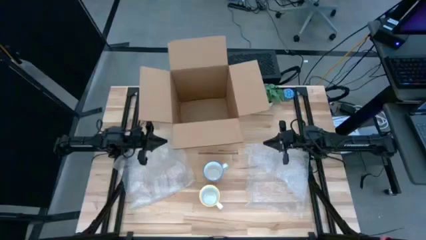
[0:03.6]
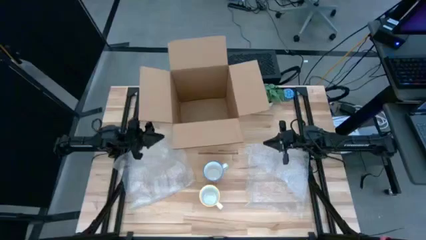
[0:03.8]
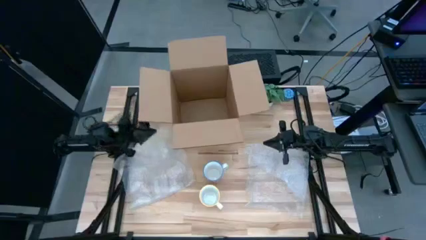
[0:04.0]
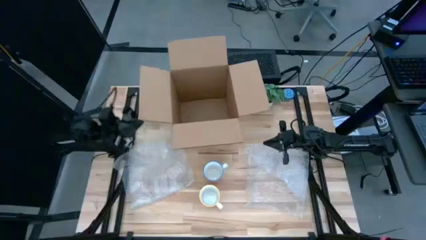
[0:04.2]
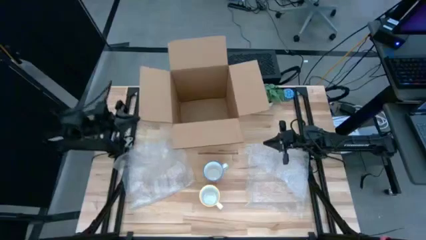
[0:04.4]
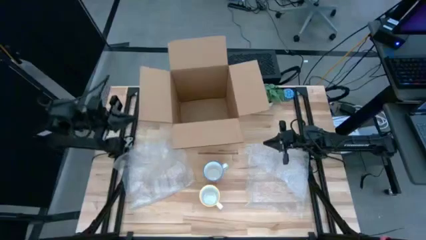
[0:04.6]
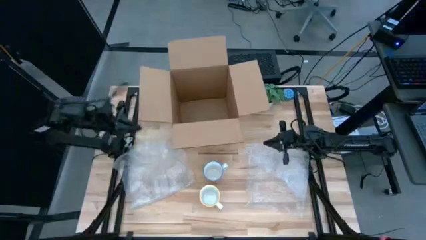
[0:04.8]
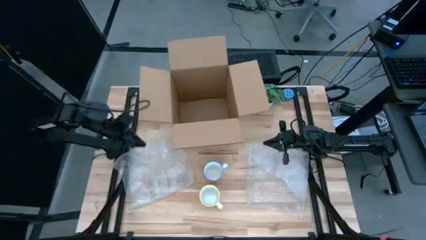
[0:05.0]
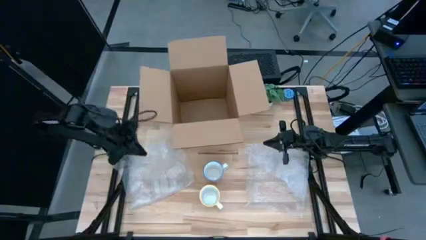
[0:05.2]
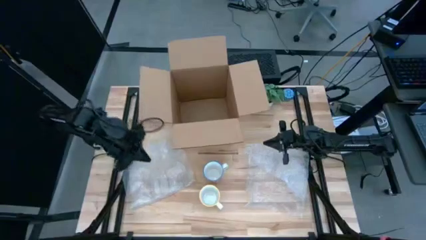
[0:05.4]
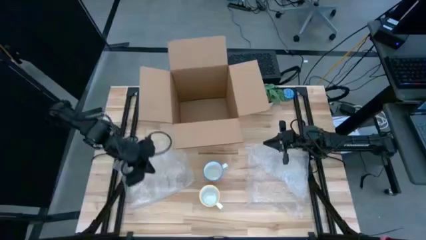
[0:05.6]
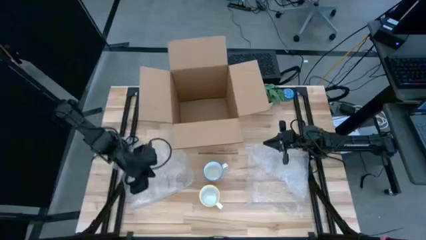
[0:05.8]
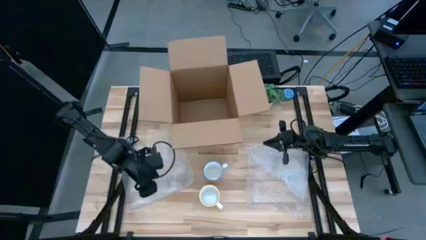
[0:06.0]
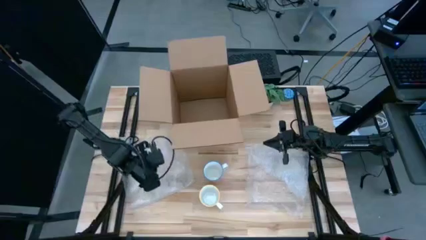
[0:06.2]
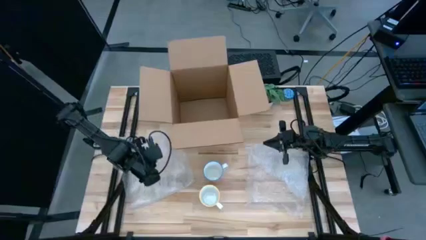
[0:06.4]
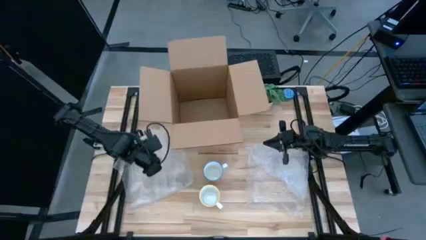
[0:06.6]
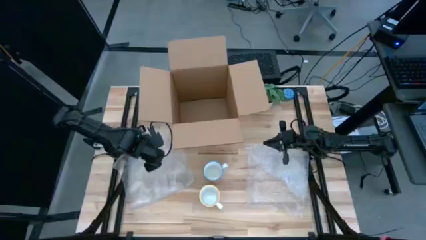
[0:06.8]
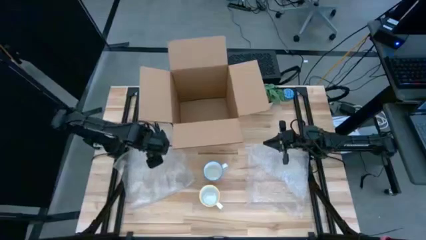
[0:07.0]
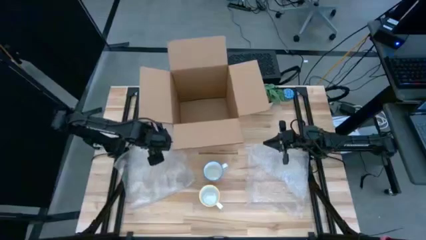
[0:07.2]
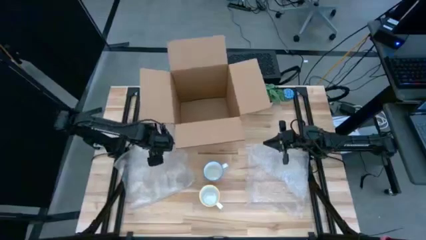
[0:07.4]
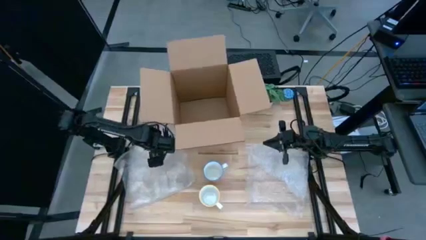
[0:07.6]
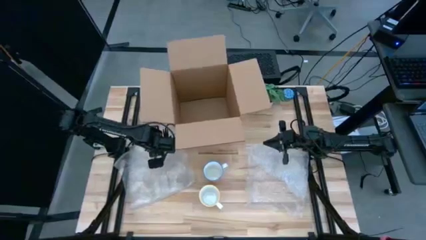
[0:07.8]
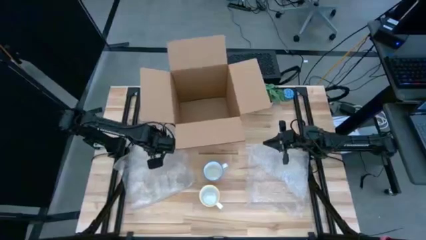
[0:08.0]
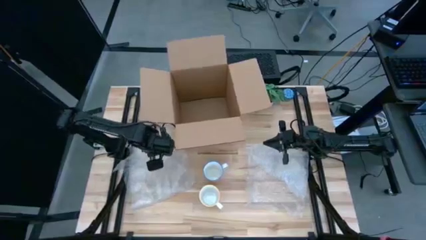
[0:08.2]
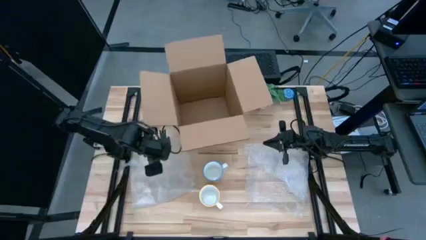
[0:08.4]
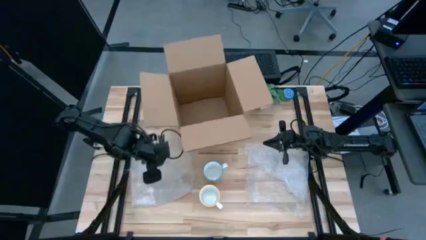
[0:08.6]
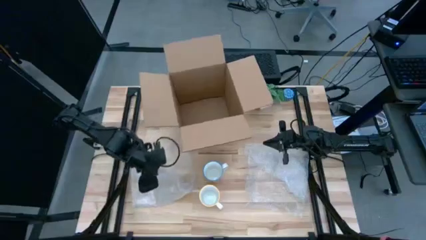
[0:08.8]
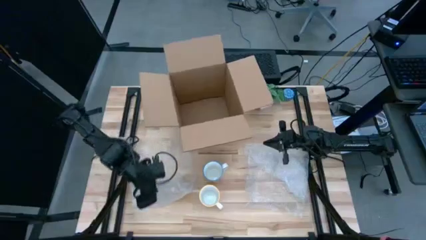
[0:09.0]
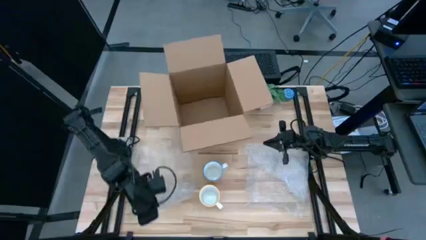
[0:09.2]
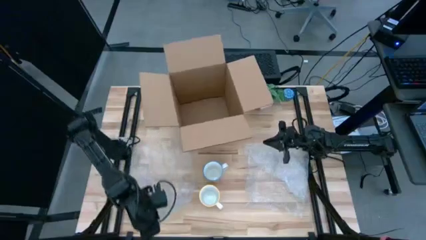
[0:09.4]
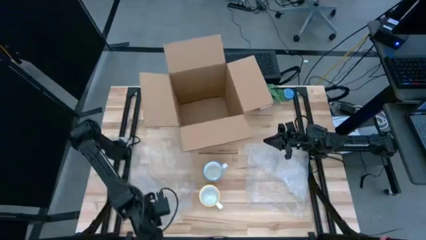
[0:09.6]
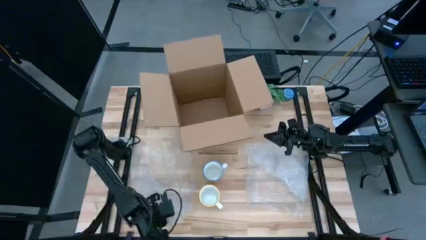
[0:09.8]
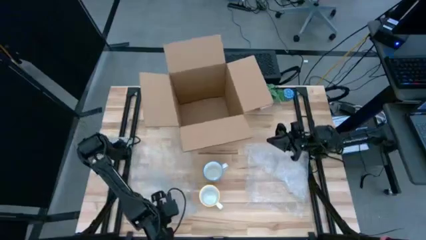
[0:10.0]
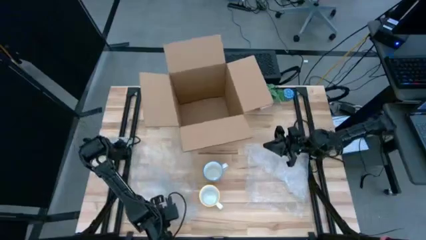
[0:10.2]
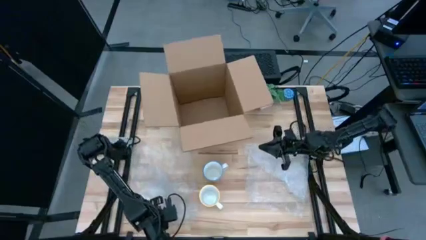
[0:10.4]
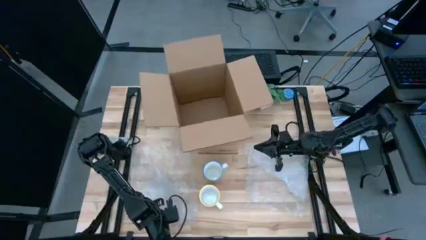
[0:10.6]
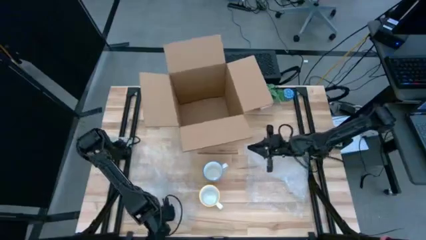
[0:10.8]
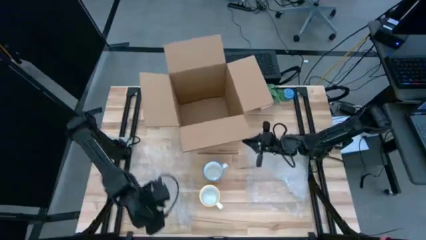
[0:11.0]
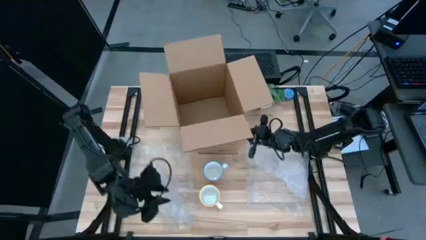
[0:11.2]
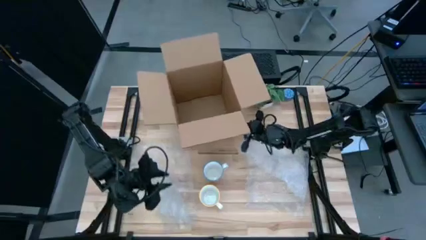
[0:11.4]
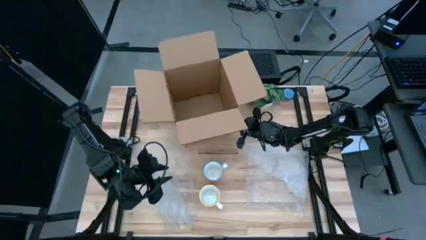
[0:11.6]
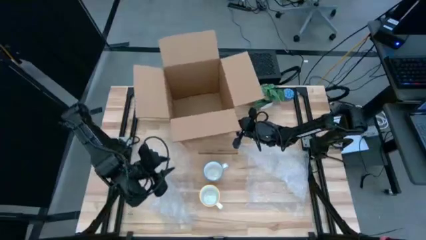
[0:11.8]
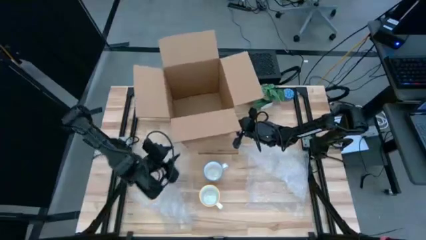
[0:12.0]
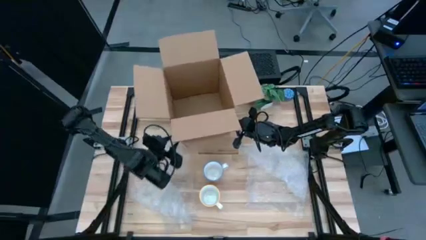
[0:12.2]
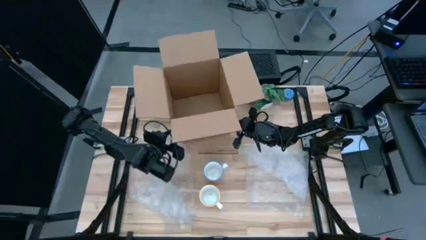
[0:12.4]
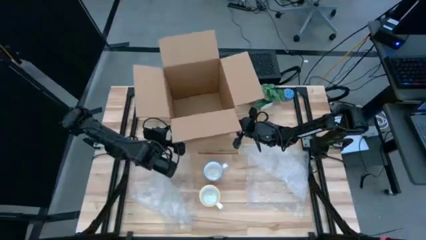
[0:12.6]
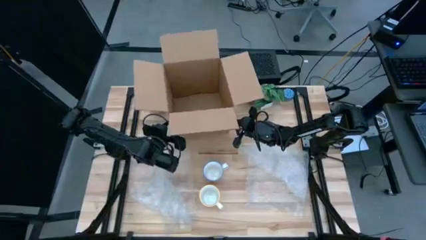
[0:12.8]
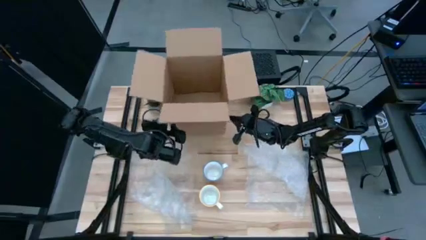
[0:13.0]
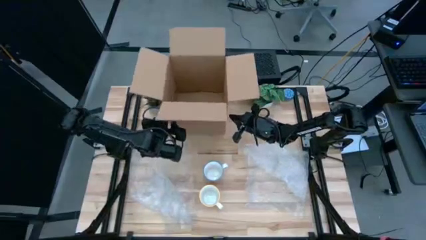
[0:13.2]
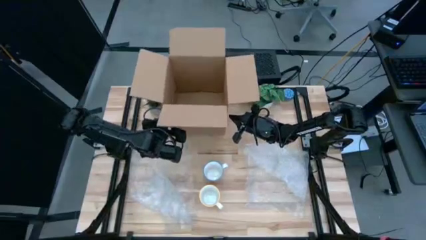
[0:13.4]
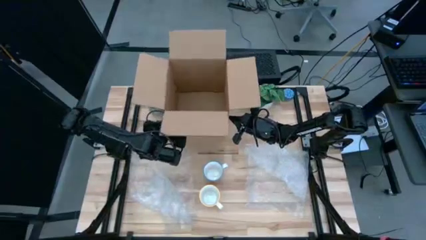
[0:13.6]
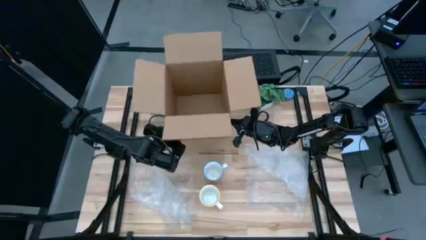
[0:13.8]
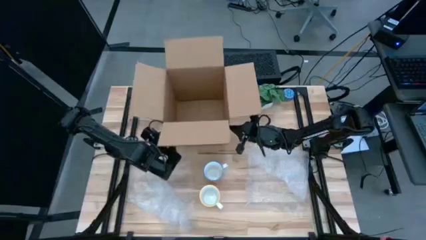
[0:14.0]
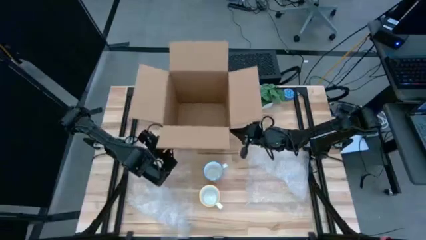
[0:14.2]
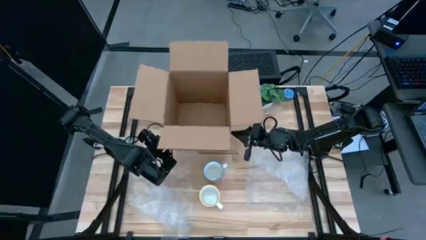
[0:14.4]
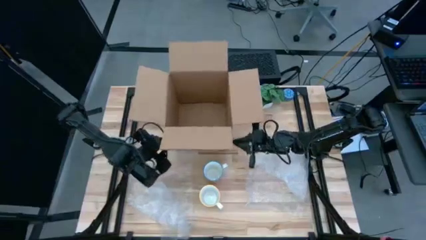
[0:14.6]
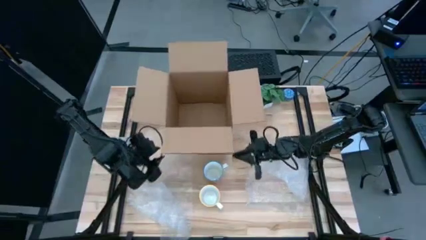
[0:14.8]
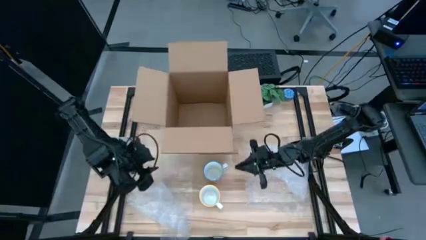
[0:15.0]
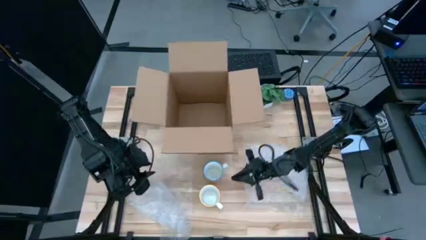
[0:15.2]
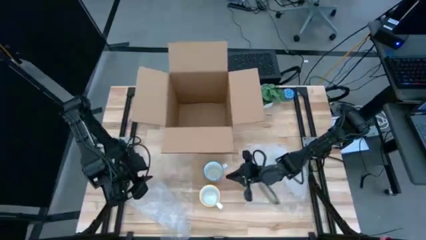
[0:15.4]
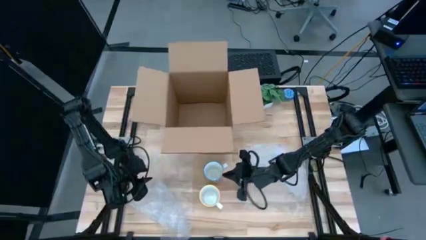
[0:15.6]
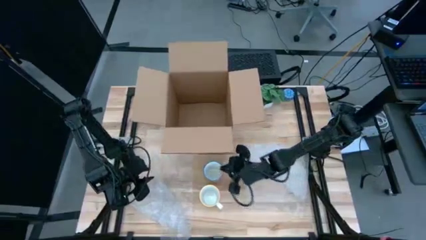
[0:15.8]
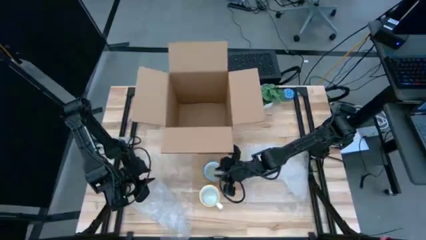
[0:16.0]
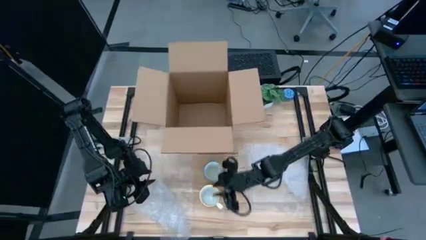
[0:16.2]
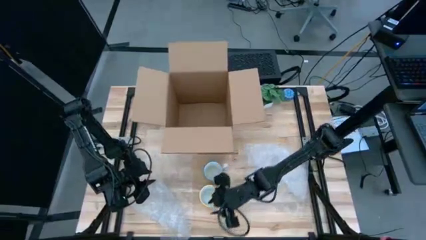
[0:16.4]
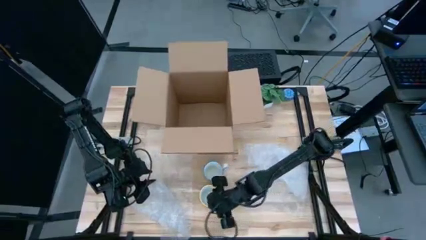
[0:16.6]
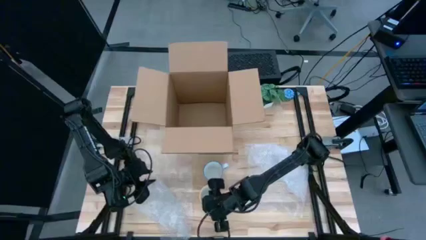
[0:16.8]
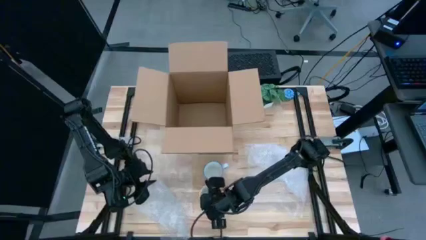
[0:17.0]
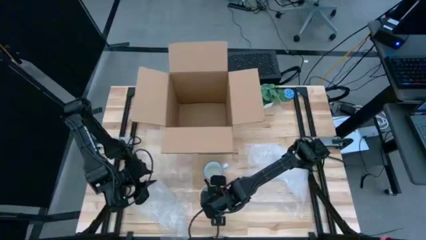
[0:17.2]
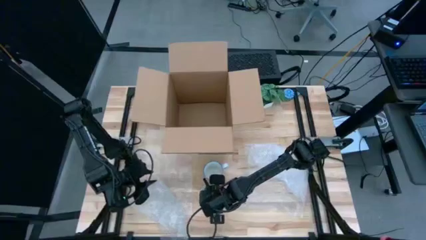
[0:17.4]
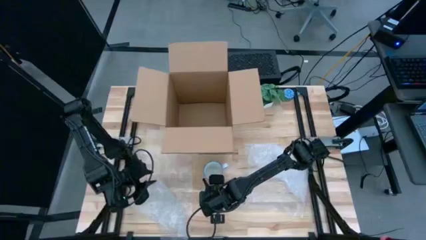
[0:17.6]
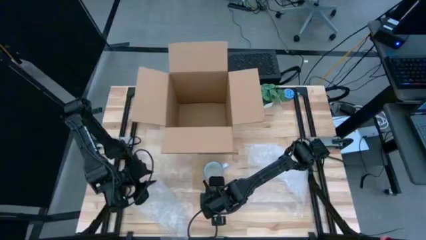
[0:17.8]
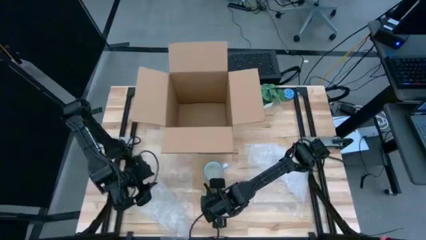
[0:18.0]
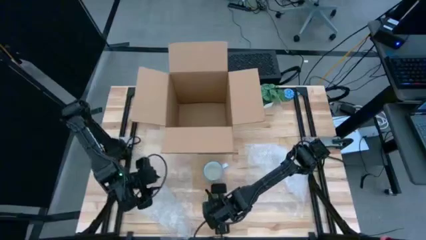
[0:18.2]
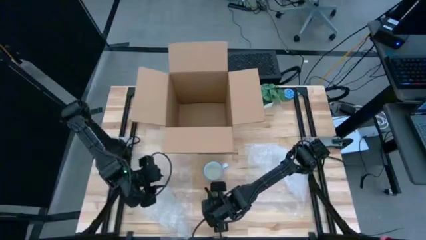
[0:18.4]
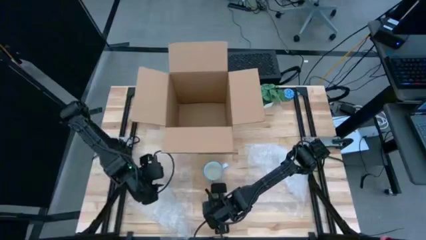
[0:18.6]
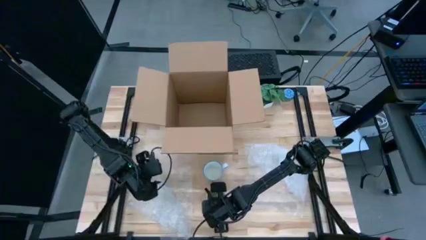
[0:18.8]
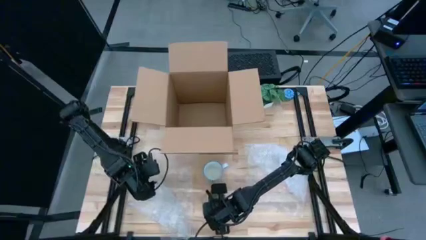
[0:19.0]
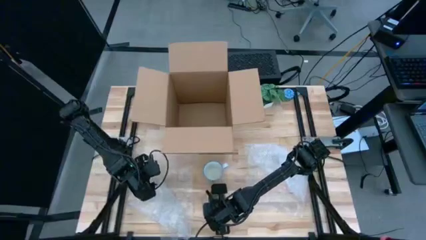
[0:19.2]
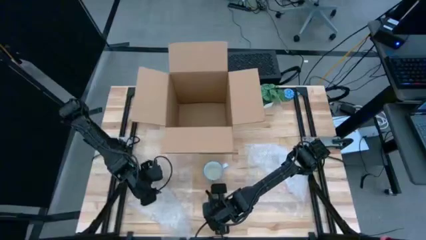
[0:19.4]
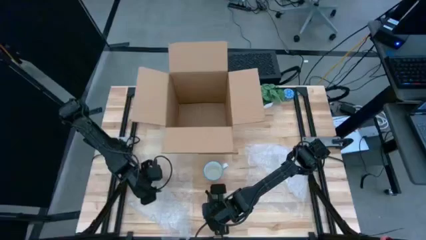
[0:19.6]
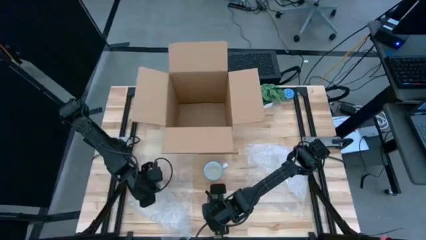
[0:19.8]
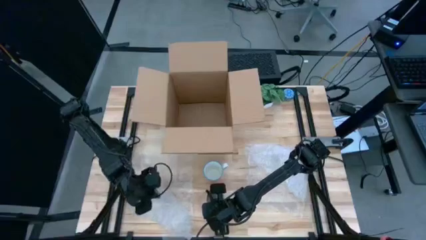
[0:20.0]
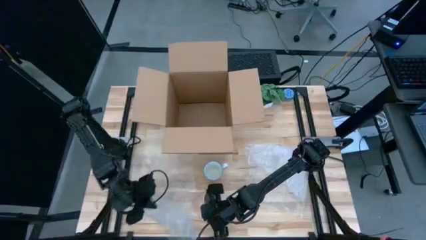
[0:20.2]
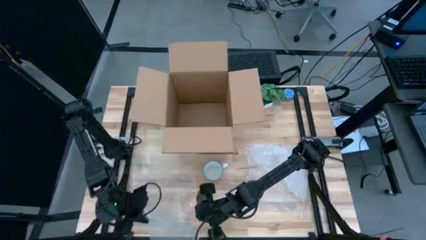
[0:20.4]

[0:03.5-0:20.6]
Task: wrap mug
Wrap the yellow mug with bubble wrap
